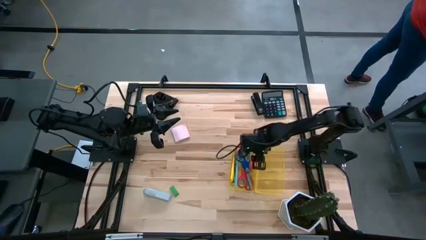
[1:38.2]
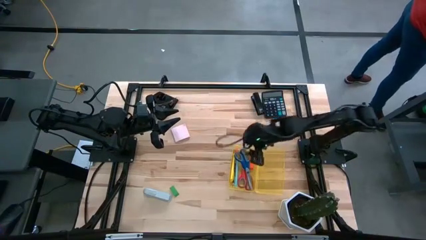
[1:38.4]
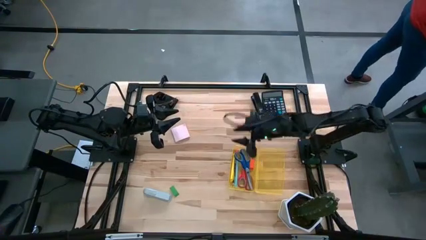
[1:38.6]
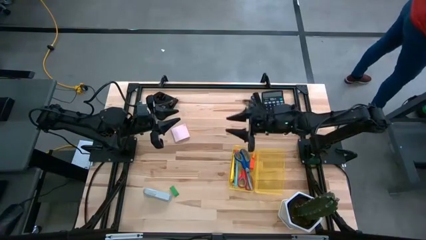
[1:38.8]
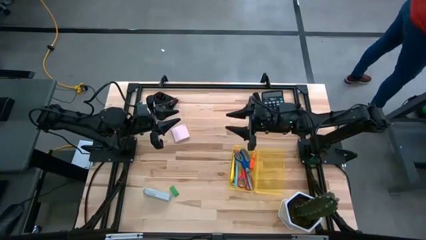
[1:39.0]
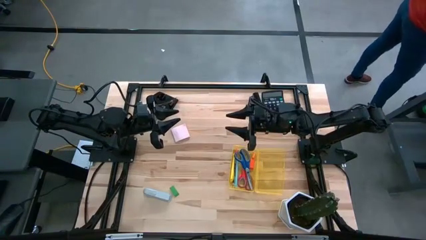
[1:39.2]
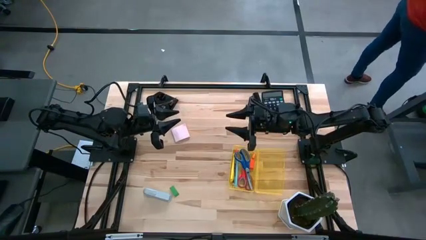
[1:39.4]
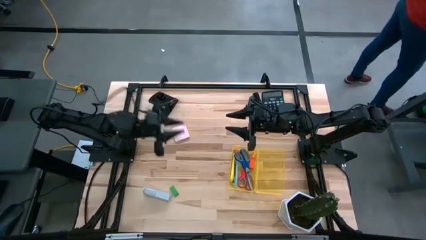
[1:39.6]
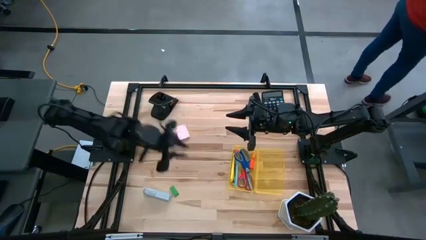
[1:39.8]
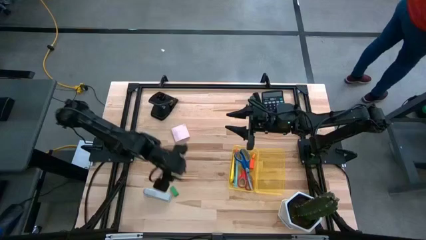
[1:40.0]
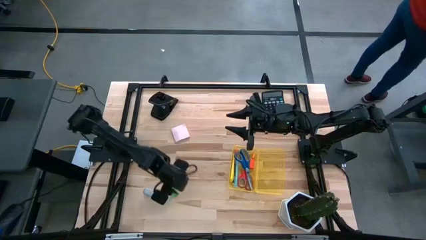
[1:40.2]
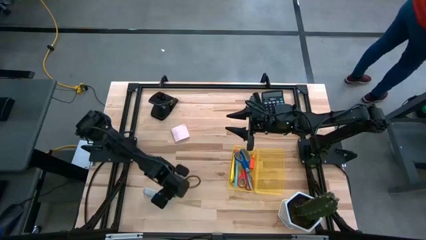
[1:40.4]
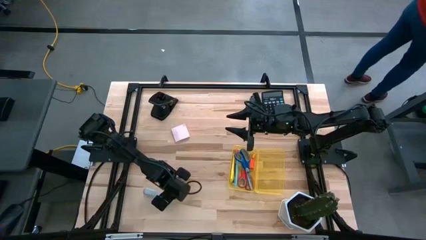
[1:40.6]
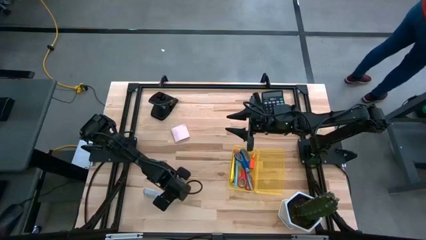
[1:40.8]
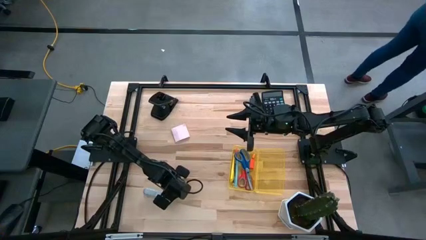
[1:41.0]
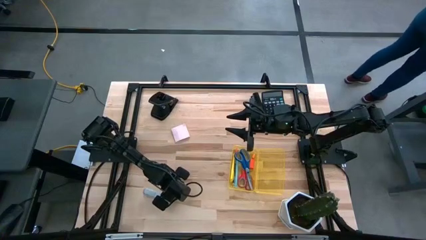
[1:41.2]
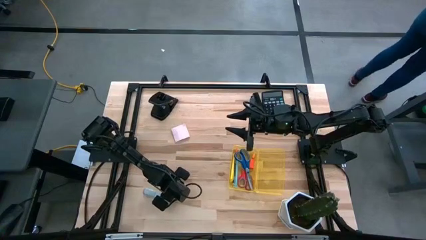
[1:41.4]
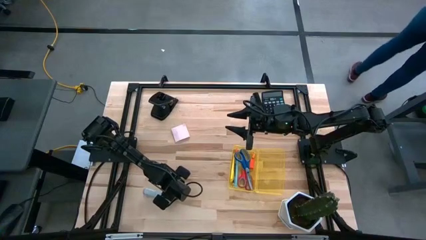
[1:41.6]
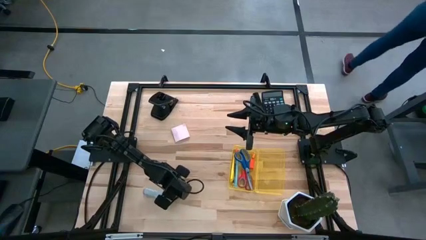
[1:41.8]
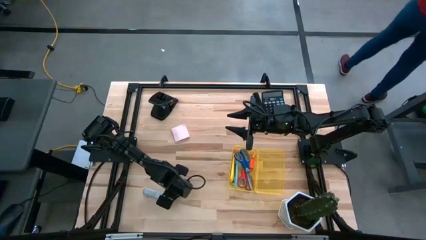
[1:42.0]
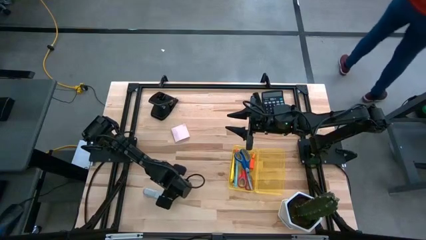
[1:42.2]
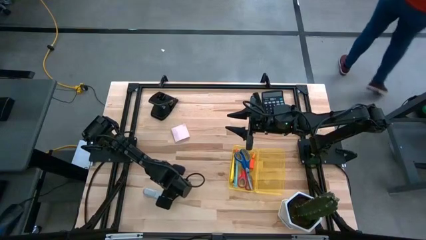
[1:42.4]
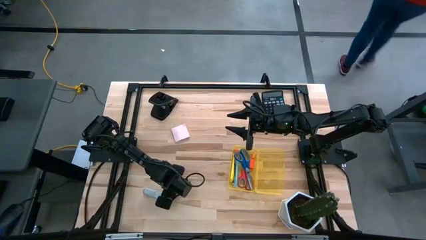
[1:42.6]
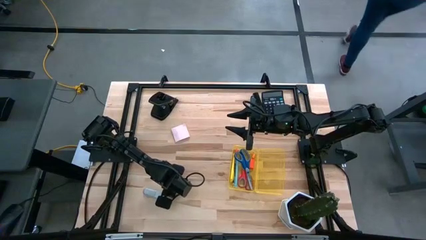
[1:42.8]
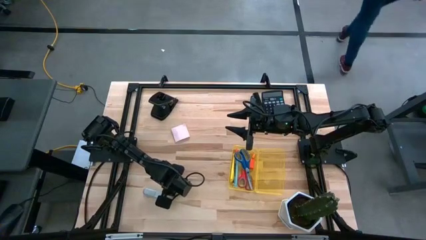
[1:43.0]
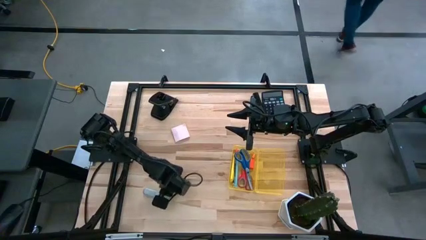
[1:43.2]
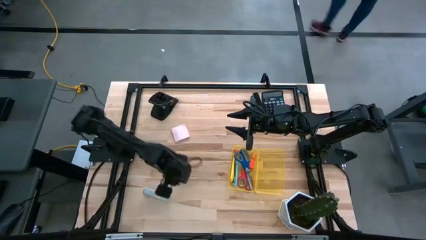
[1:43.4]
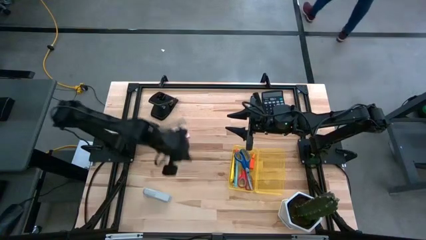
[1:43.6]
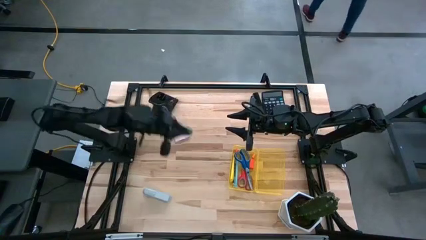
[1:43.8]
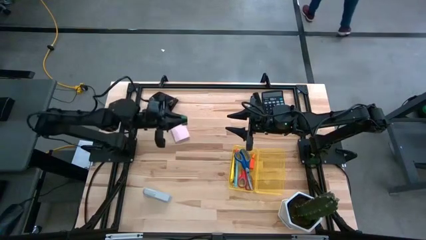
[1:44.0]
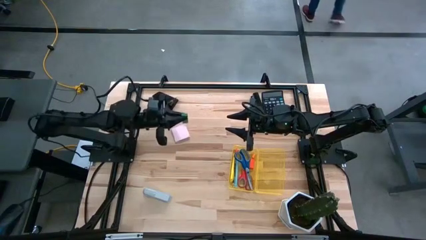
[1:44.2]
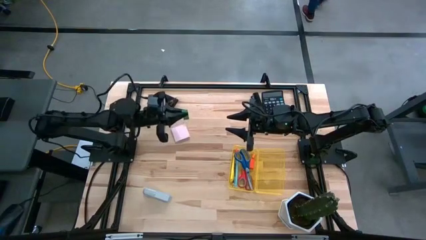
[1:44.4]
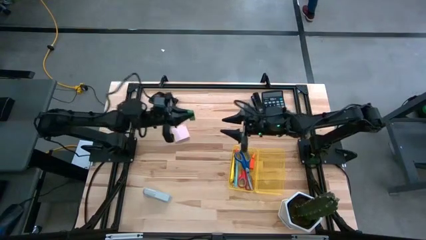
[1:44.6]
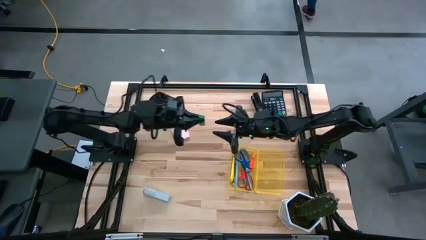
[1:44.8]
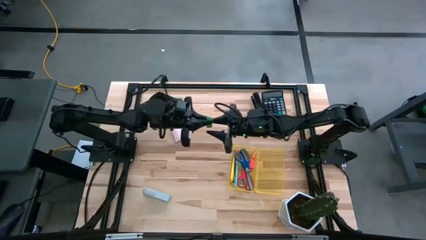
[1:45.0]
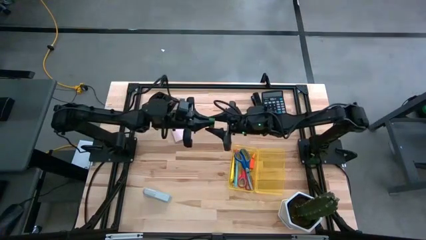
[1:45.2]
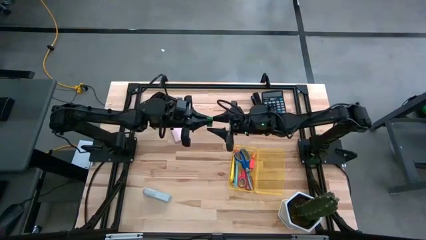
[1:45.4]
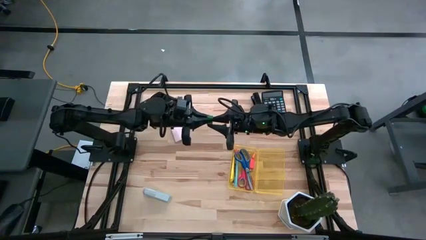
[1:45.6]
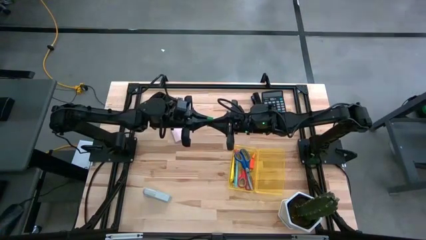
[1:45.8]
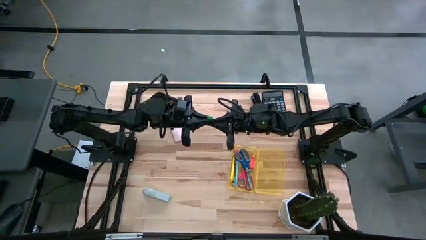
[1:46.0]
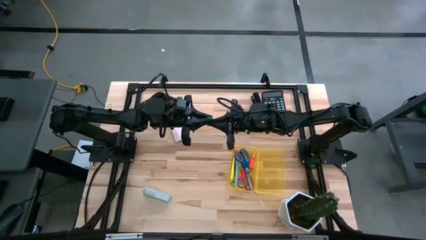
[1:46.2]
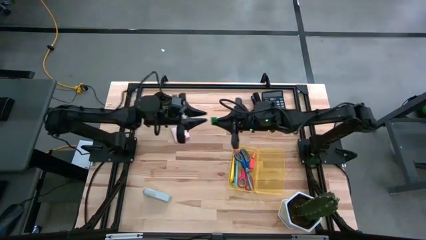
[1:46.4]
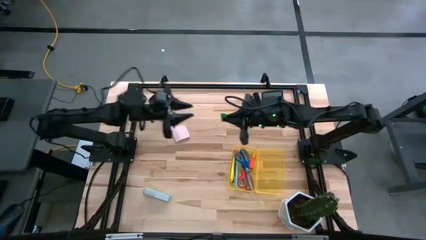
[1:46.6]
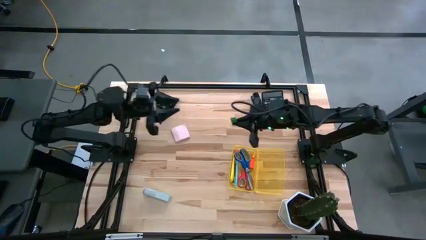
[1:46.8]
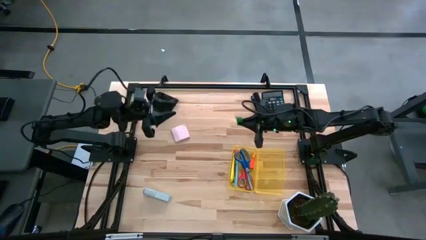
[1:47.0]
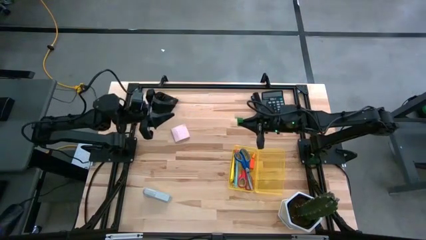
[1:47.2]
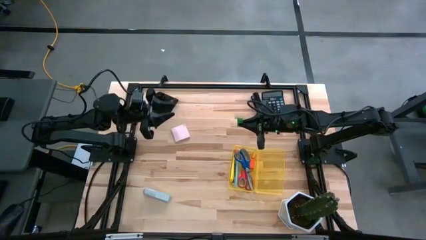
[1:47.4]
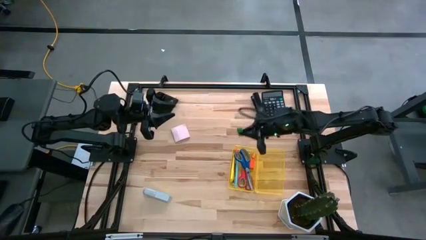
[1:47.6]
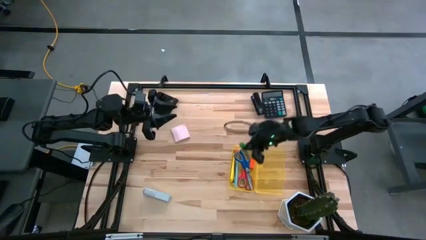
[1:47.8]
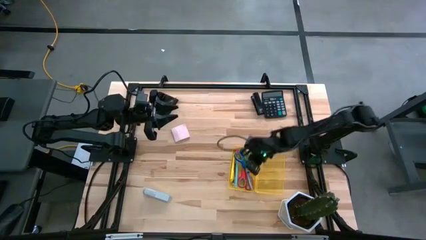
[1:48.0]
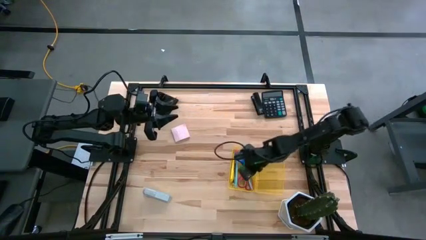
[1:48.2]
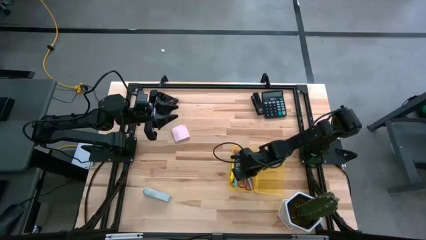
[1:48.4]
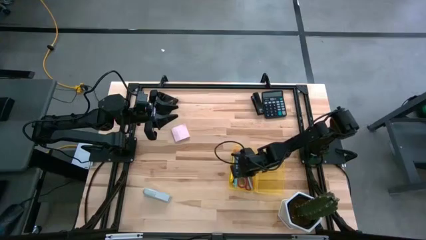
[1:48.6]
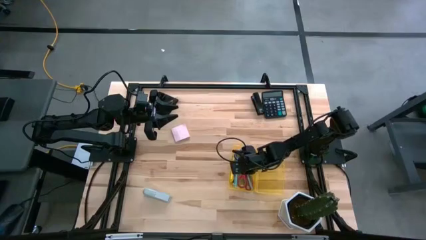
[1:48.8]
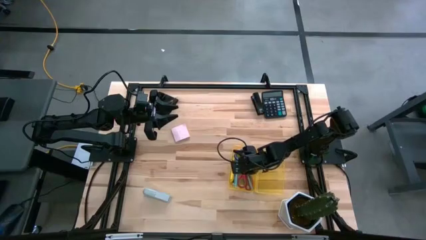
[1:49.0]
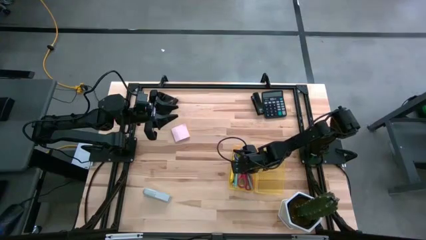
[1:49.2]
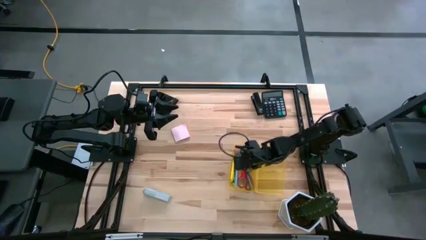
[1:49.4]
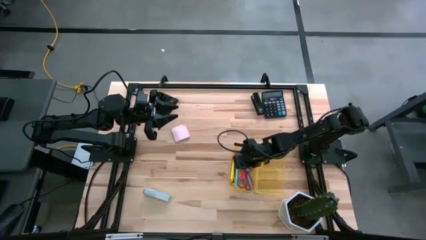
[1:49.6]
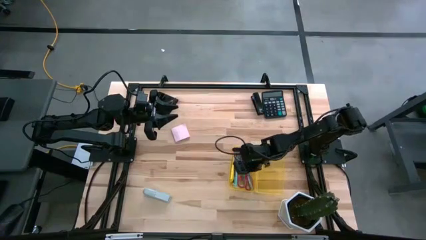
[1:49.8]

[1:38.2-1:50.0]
Task: Pack school essentials
Put the green eraser into the supply box
